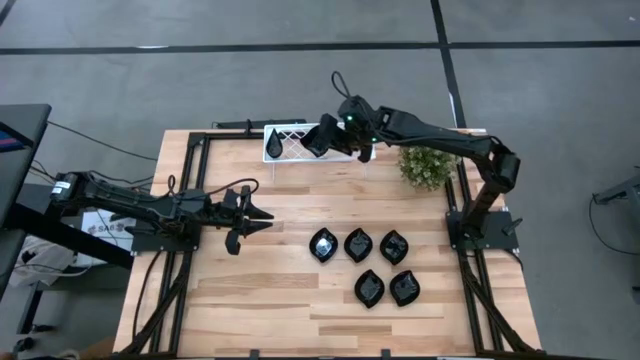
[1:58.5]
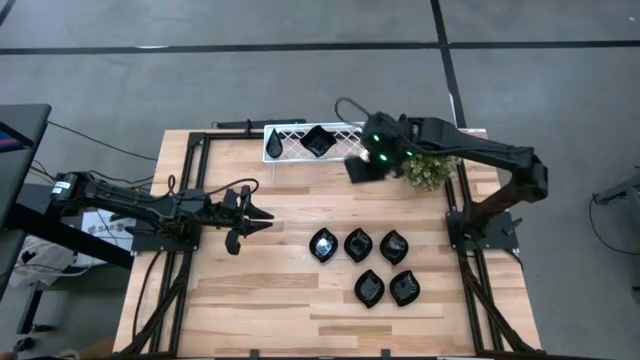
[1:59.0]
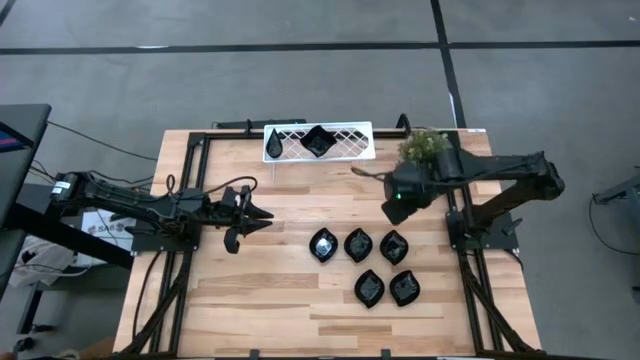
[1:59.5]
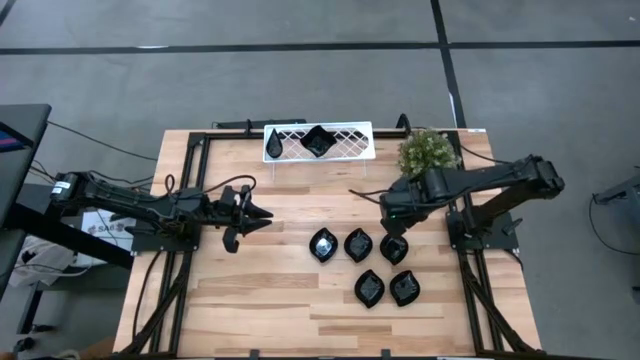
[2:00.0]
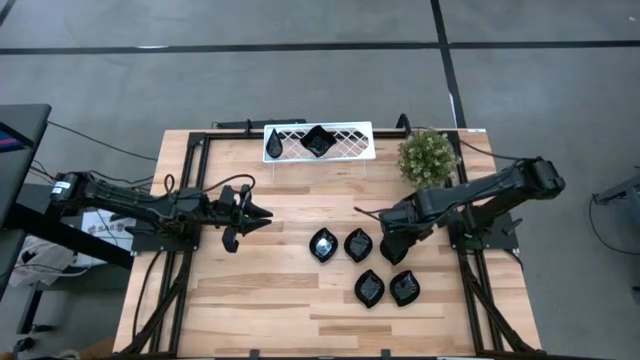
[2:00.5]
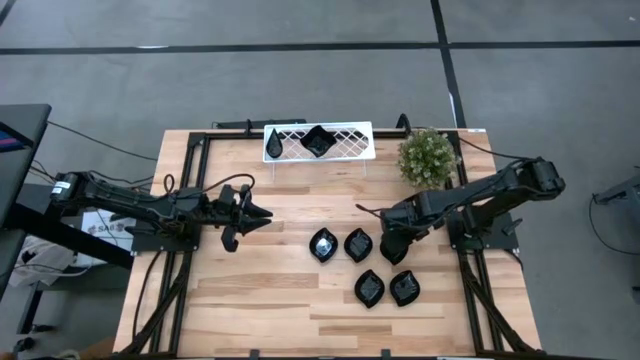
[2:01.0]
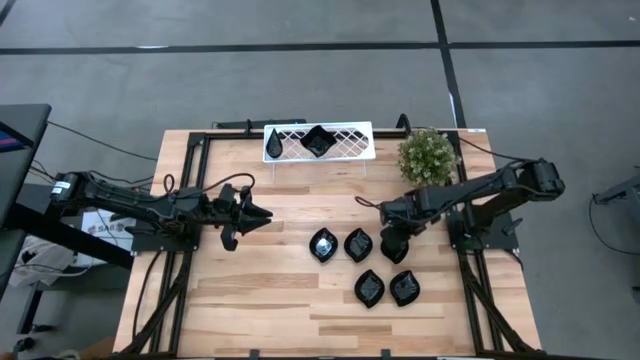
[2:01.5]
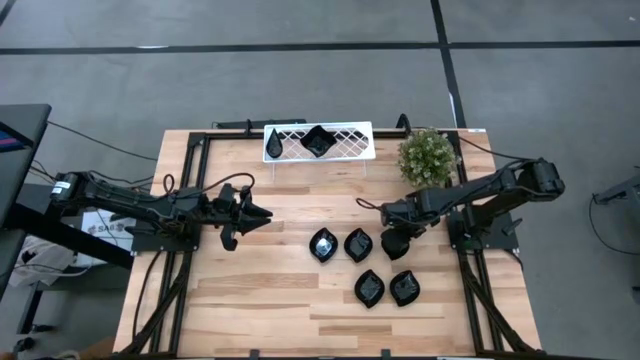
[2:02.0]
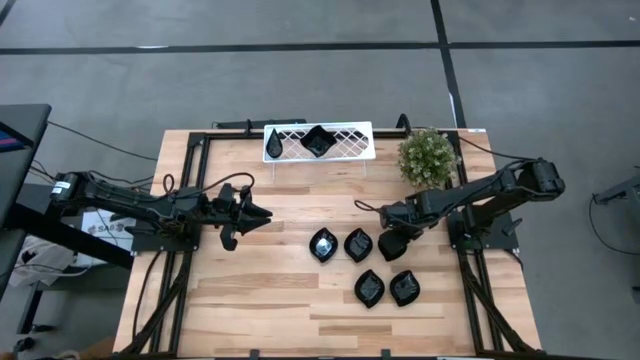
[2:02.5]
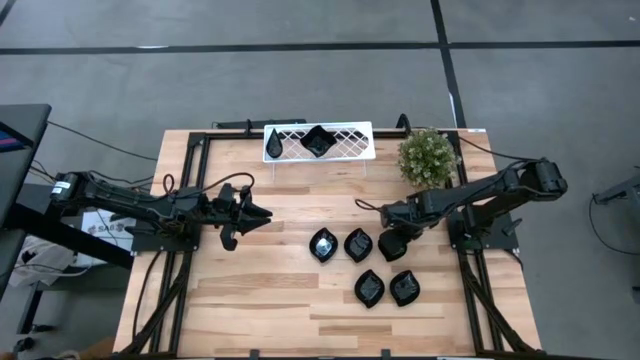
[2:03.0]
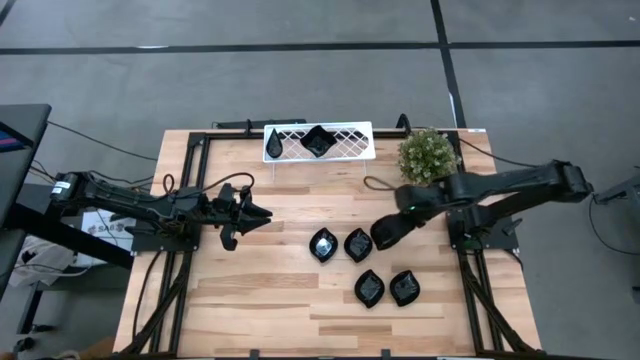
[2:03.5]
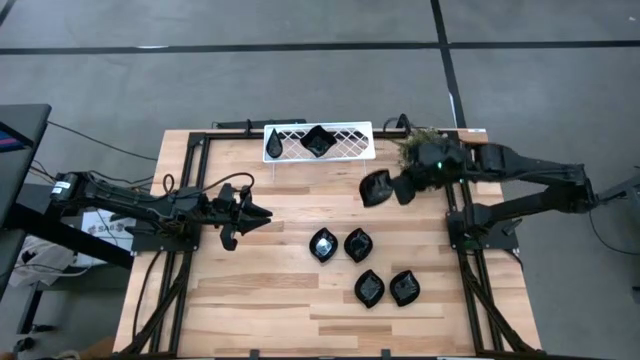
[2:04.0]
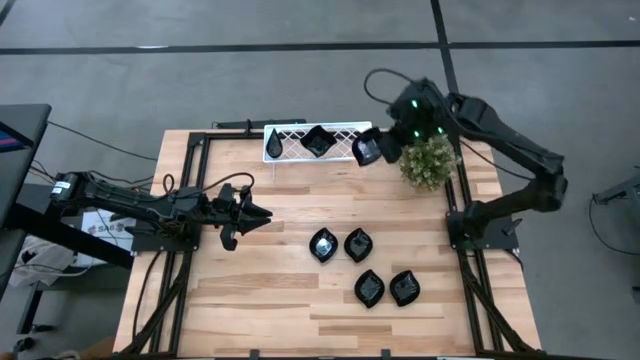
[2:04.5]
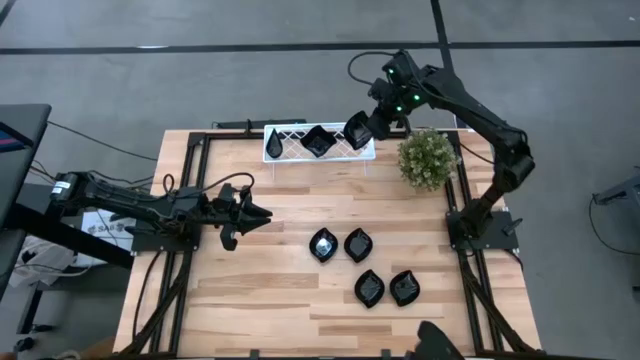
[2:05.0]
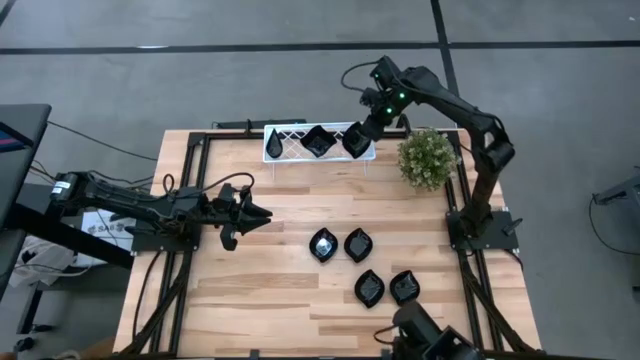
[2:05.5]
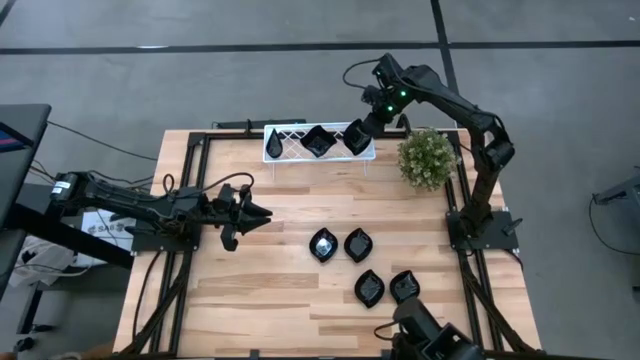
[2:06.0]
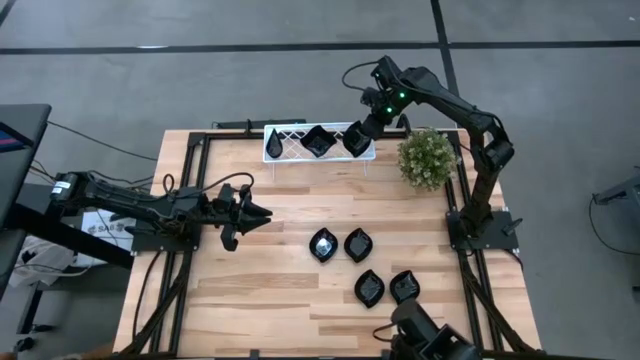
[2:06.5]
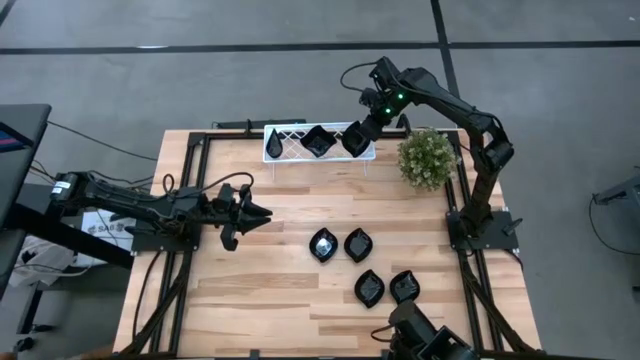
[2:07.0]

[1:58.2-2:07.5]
Task: Pick & Place Mini shaped plates
Put the black leaf-shaped plate on the shelf

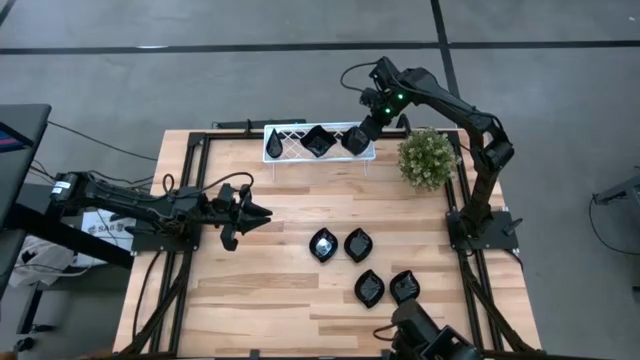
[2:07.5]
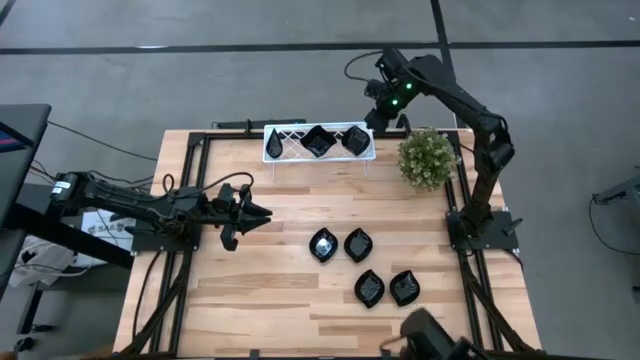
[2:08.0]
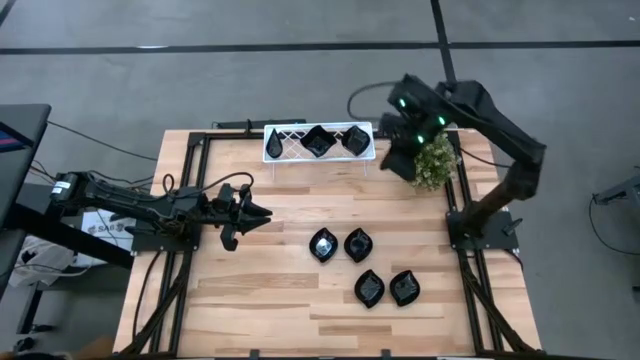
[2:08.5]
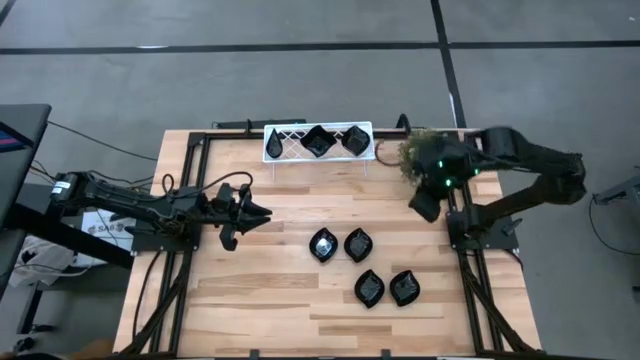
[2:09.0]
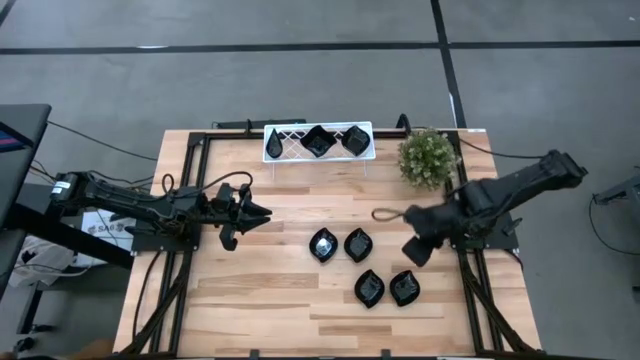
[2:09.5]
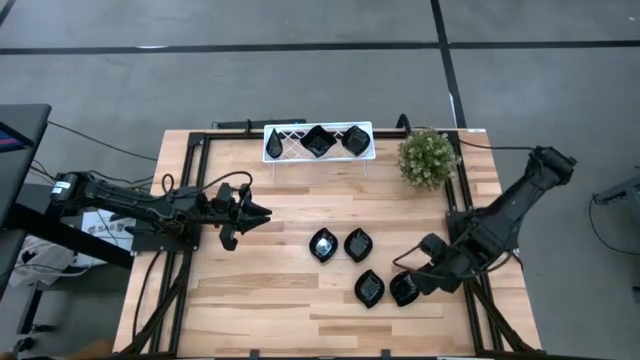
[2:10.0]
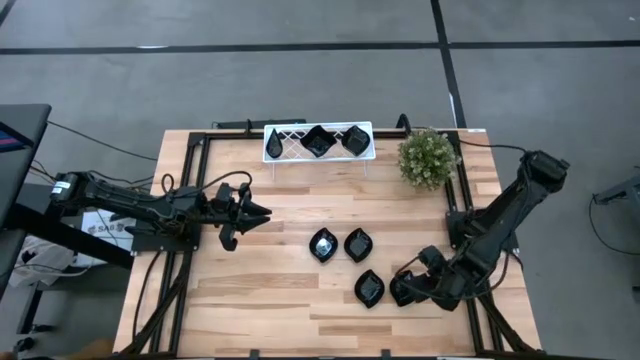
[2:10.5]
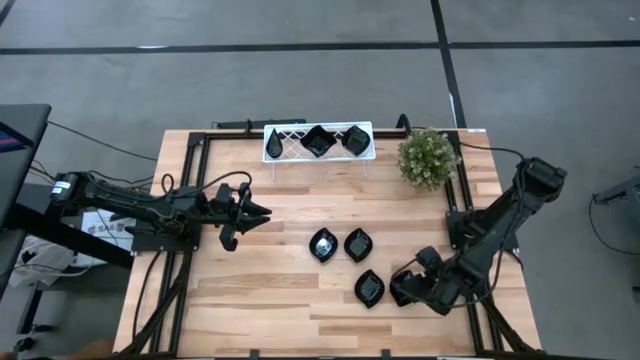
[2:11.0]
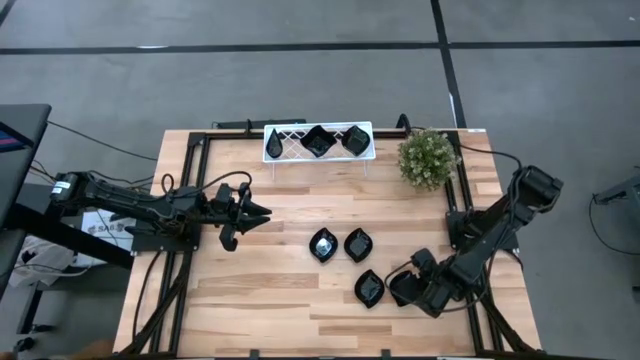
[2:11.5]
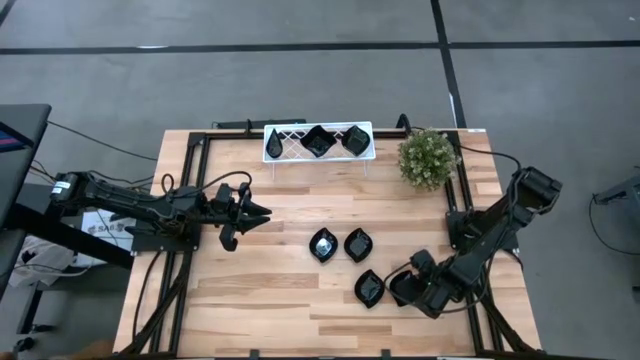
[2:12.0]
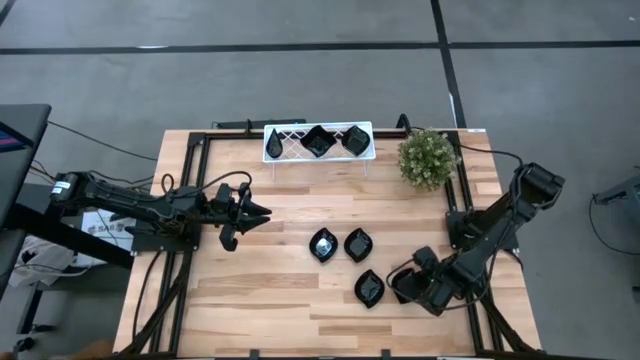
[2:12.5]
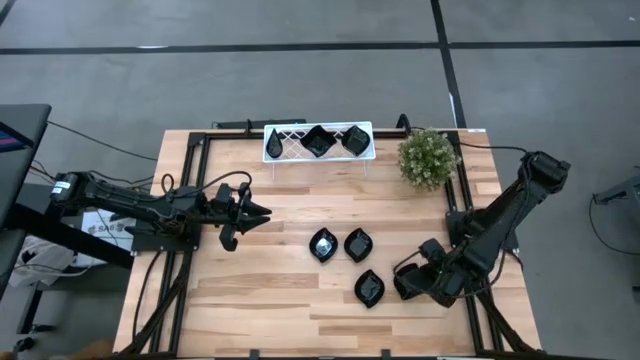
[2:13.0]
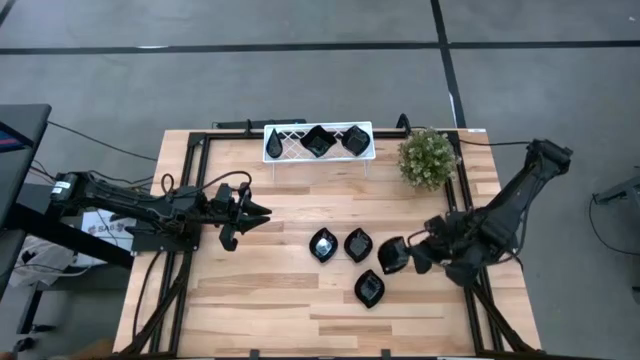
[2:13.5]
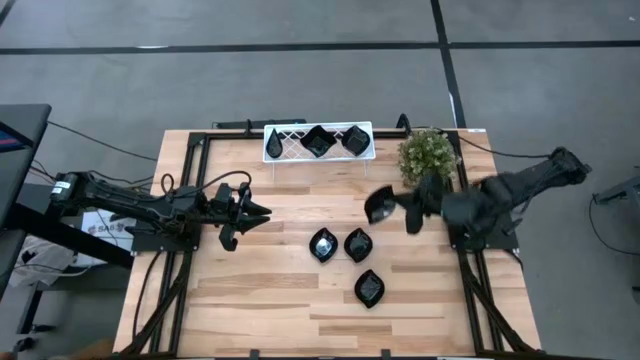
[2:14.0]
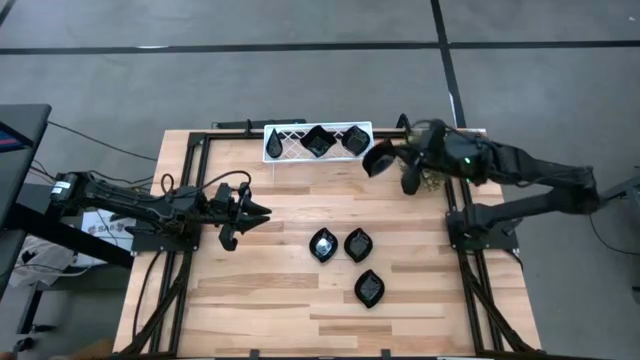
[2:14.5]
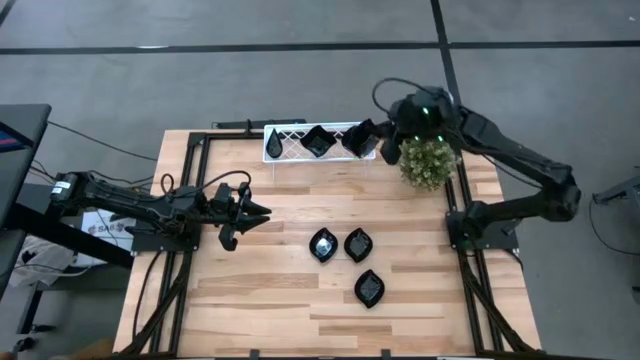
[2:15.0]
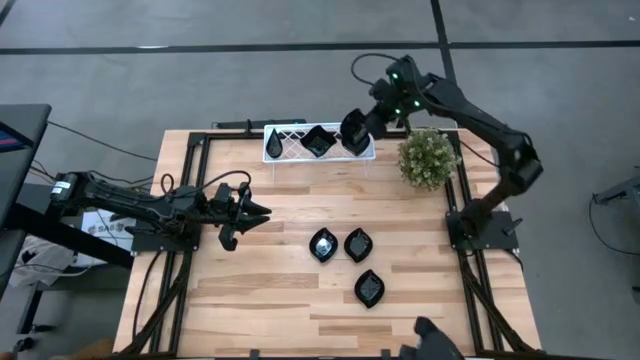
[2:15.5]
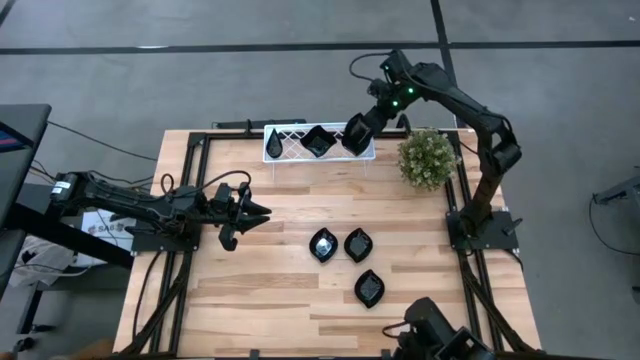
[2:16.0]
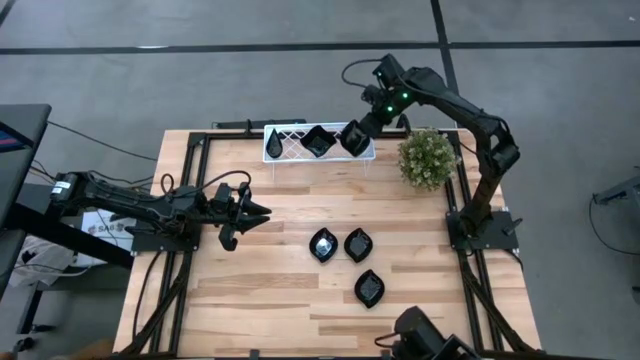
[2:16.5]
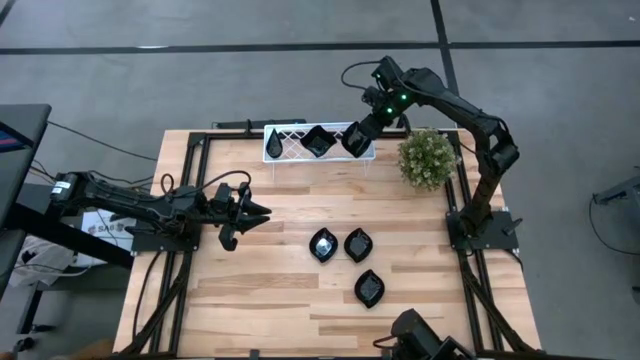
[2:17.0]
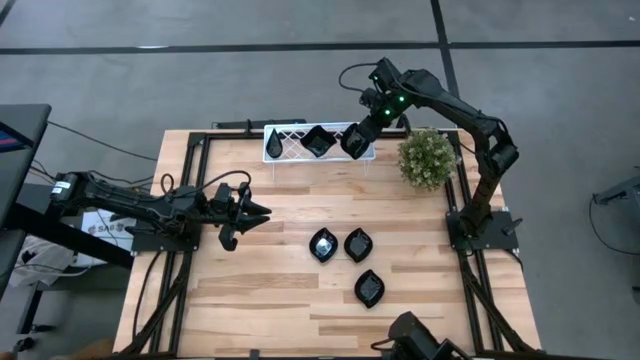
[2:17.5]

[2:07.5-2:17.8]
Stack the black leaf-shaped plate on top of the black leaf-shaped plate on the shelf

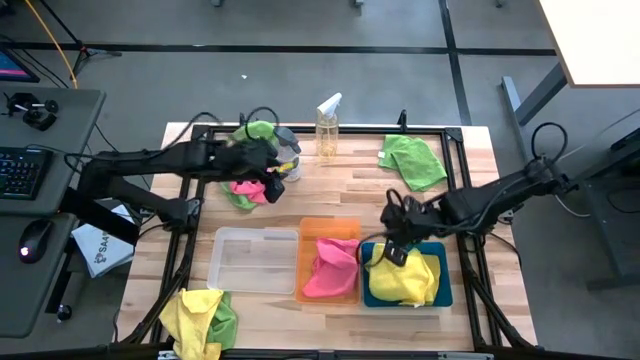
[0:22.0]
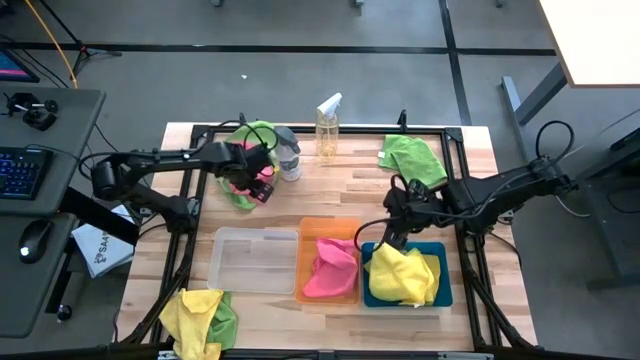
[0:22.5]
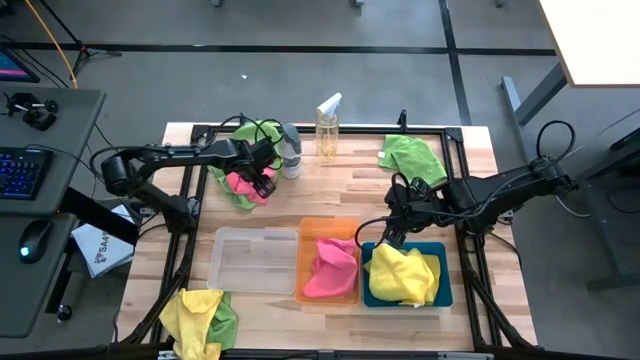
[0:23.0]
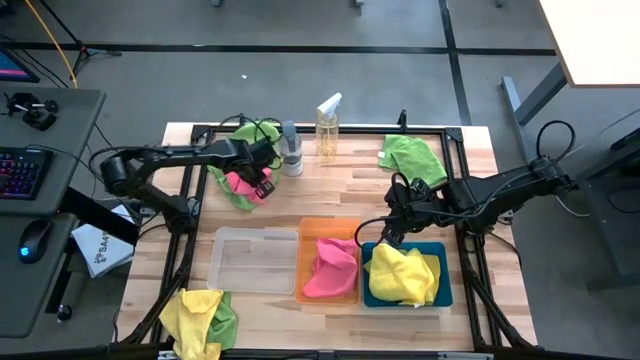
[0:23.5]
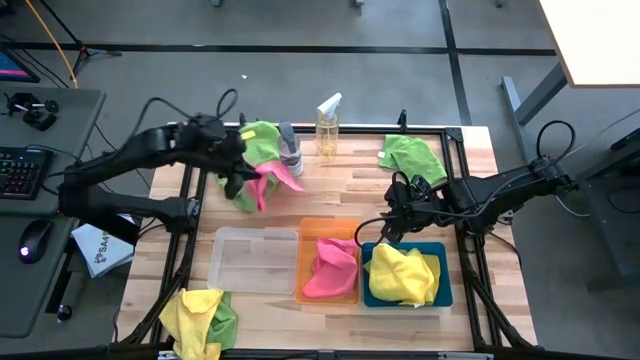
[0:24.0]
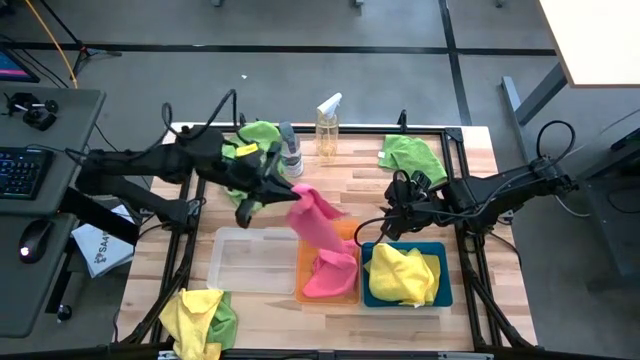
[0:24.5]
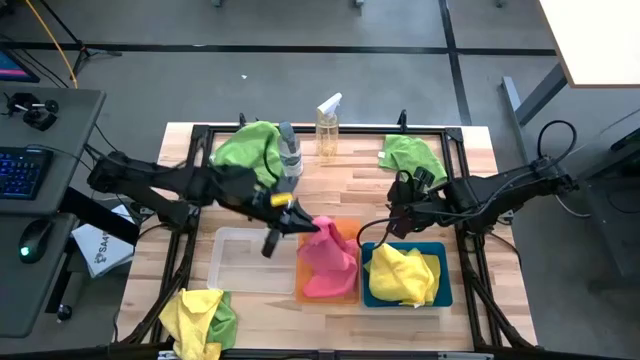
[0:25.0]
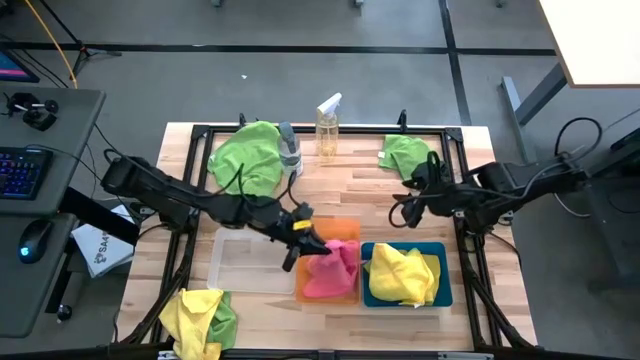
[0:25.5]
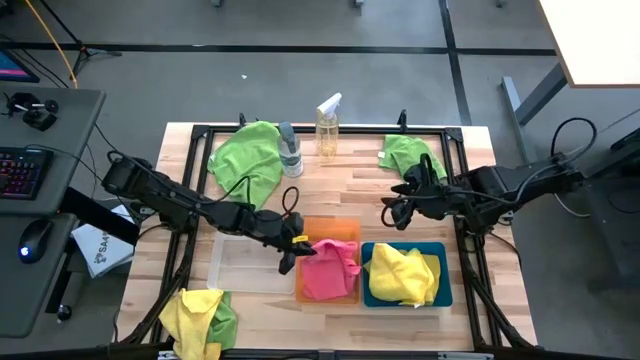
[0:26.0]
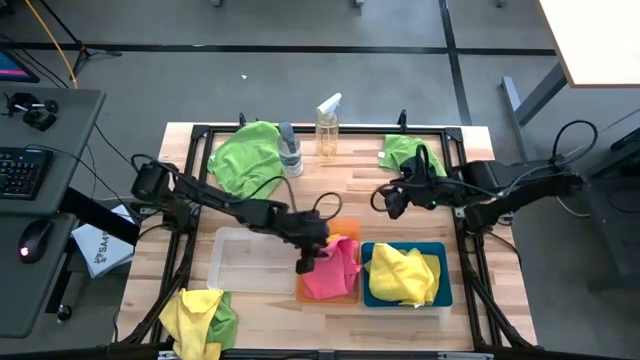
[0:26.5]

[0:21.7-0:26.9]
Task: Sort microfiber towel by color & place in baskets
Put the pink towel into the orange bin
